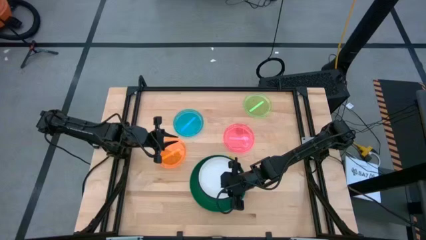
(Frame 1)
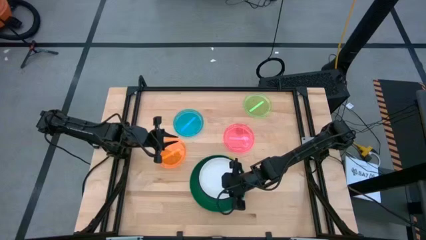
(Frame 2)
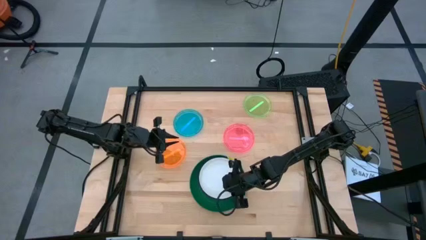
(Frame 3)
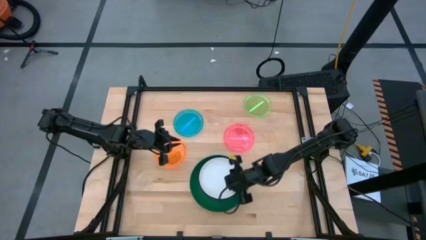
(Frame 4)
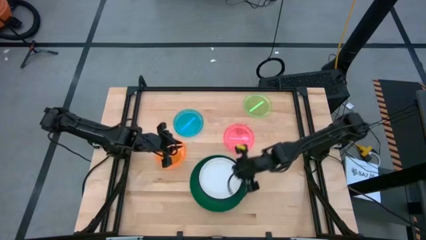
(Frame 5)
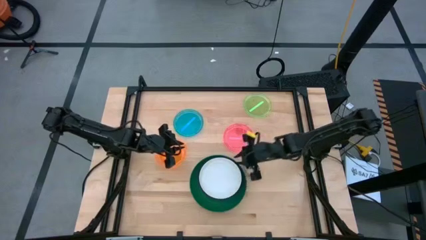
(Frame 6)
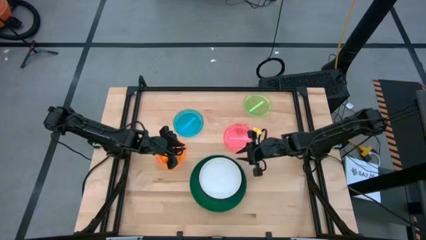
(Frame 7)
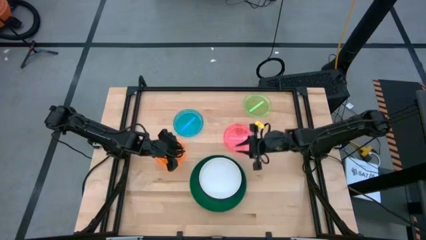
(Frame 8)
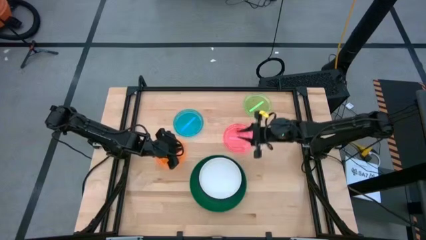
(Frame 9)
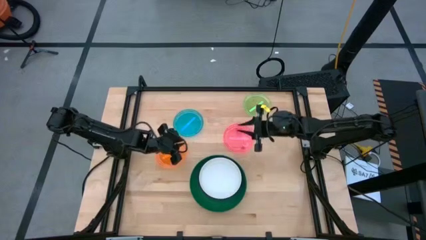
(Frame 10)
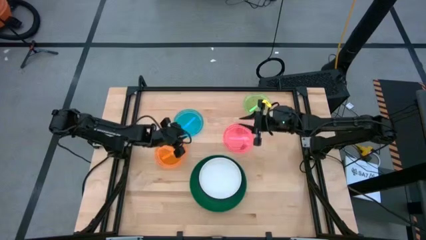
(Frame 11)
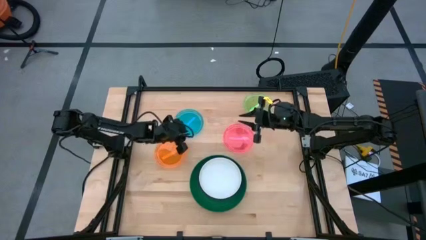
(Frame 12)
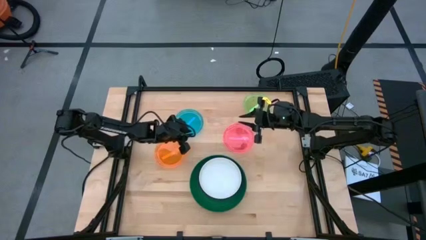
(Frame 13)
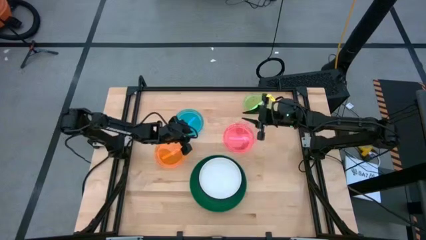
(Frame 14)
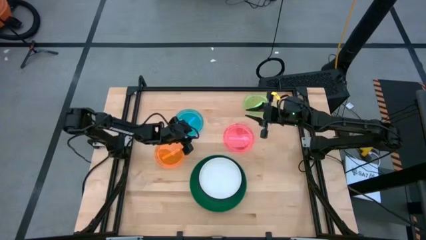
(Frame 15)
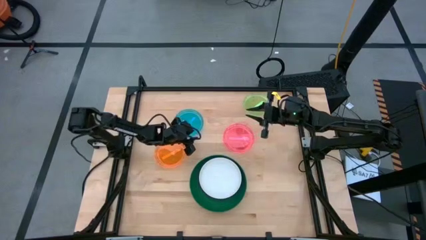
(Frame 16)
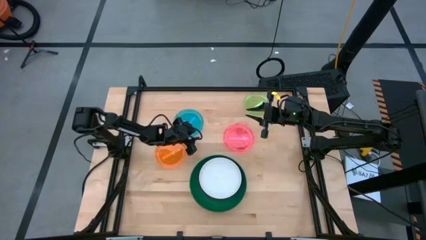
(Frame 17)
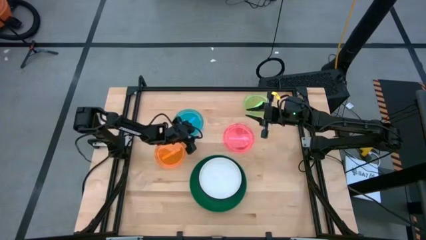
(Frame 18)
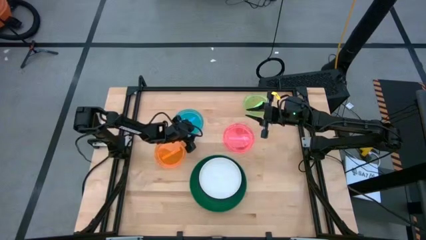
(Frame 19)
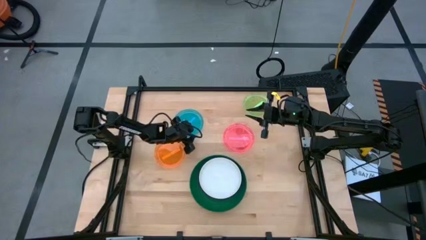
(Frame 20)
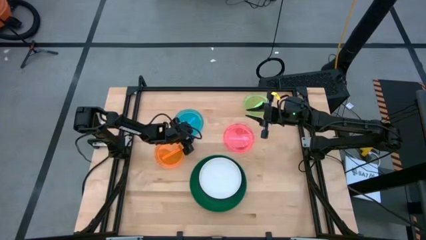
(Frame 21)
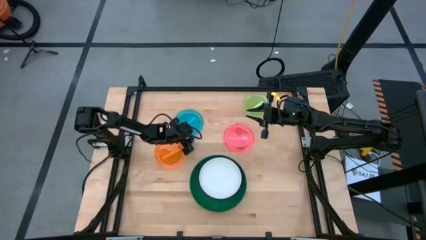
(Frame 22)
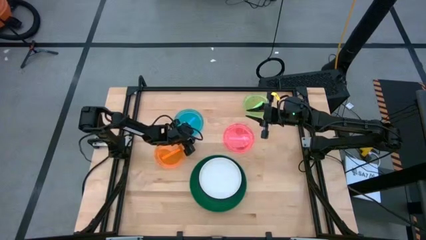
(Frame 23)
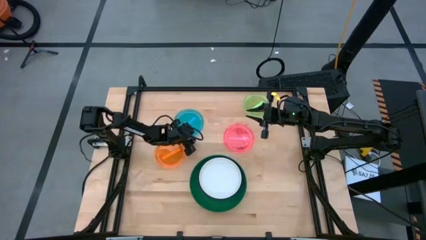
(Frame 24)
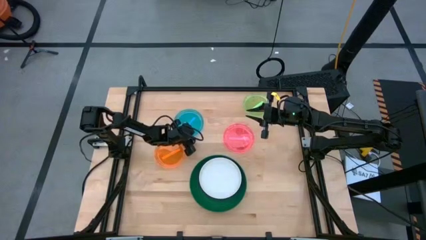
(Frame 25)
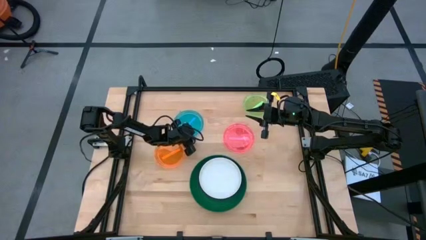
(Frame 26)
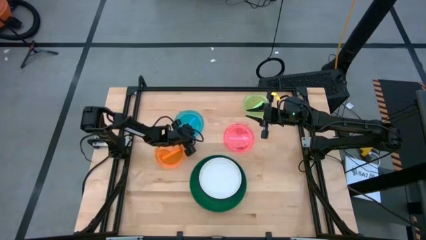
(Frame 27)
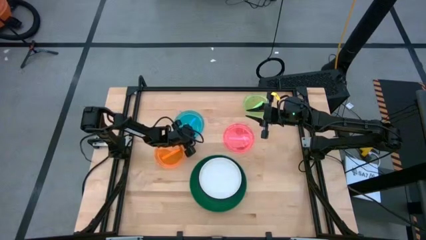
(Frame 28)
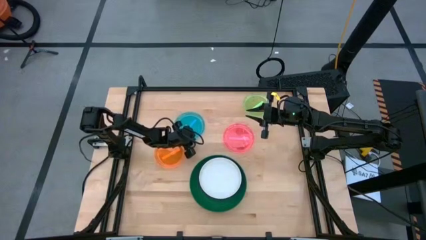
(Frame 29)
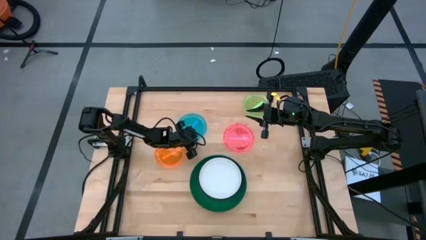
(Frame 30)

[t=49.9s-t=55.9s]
Task: Stack plastic plates
Stack the light blue plate on top of the white plate

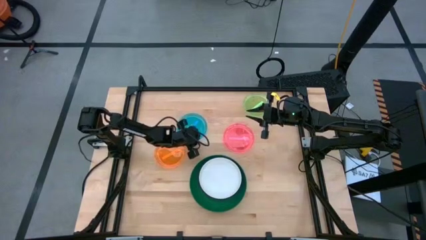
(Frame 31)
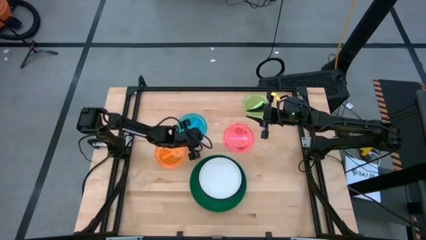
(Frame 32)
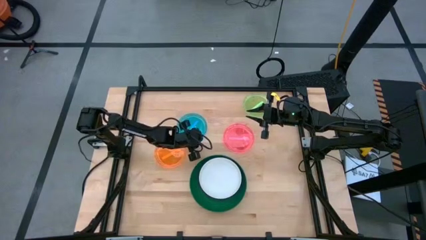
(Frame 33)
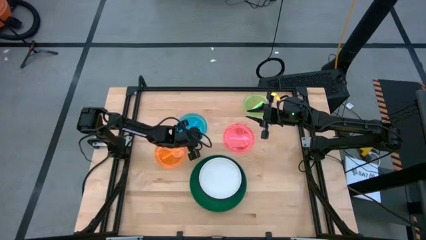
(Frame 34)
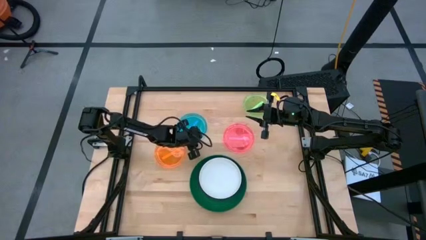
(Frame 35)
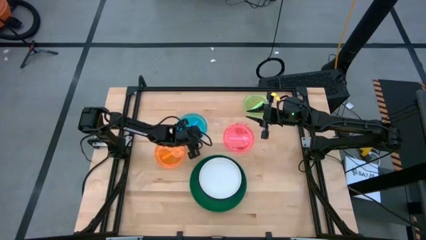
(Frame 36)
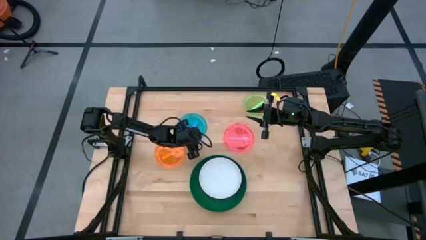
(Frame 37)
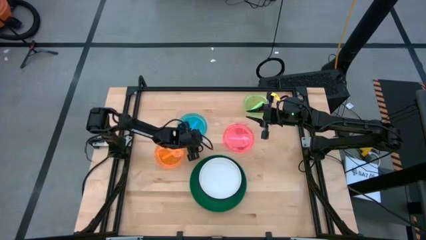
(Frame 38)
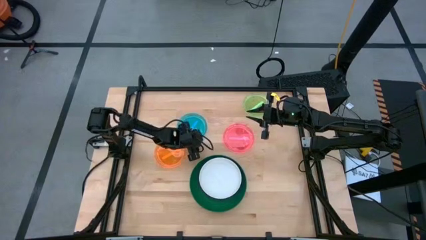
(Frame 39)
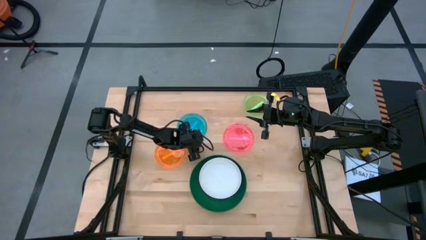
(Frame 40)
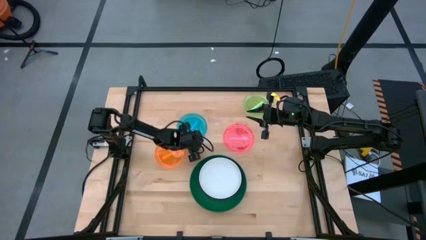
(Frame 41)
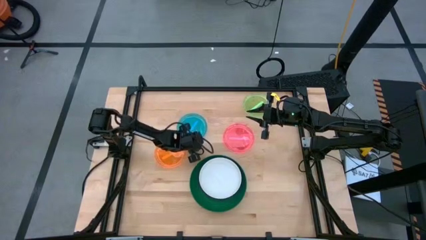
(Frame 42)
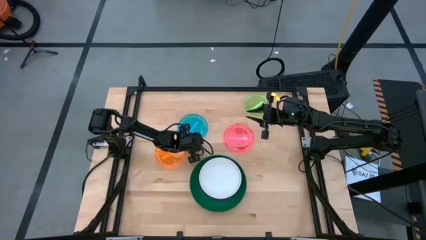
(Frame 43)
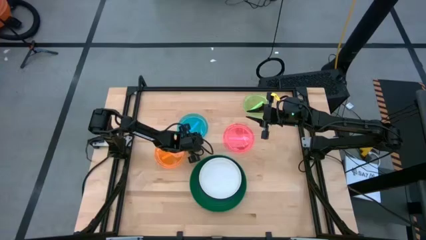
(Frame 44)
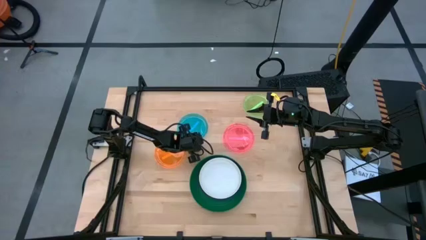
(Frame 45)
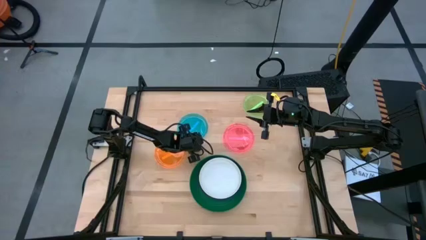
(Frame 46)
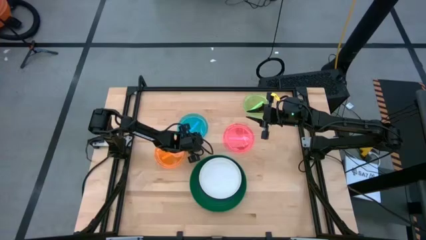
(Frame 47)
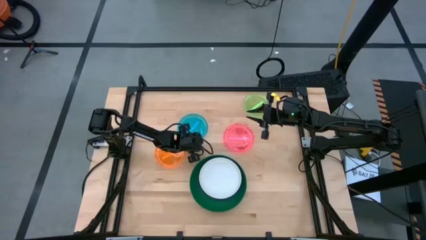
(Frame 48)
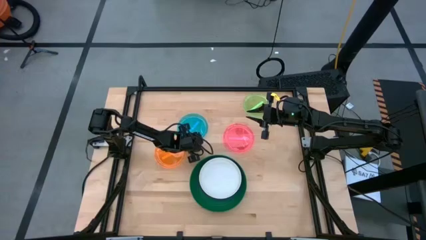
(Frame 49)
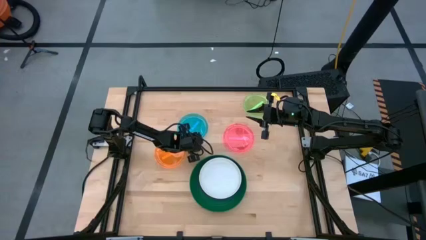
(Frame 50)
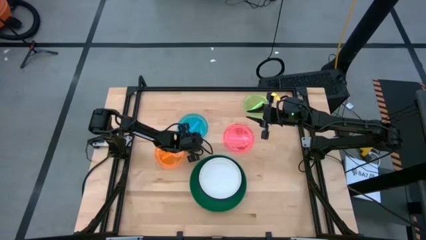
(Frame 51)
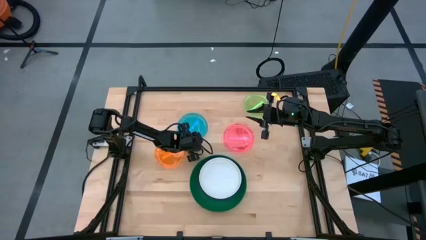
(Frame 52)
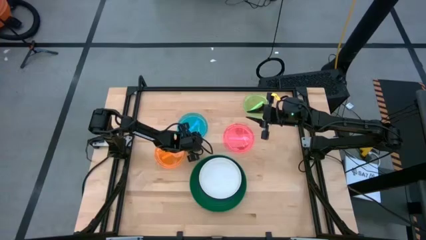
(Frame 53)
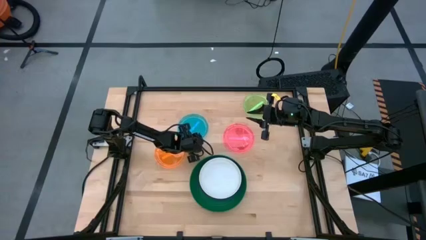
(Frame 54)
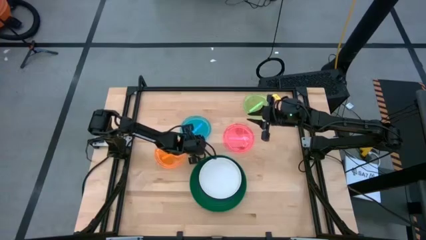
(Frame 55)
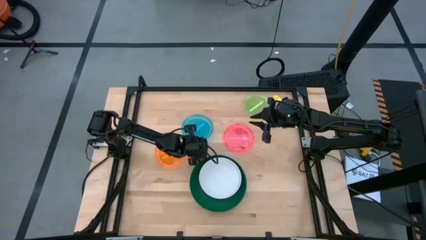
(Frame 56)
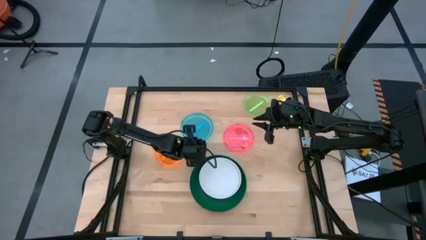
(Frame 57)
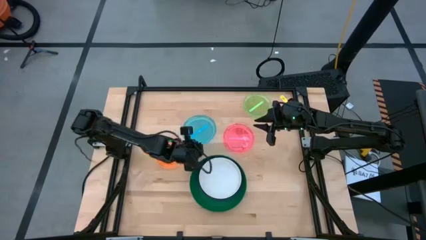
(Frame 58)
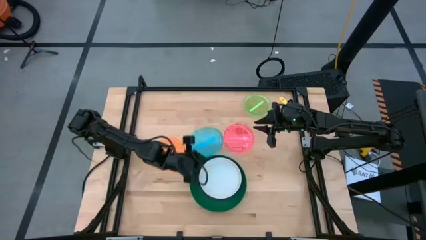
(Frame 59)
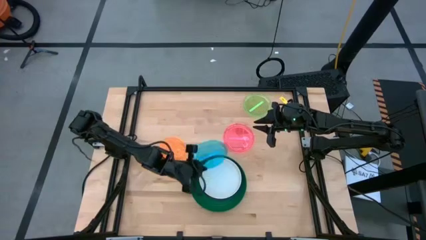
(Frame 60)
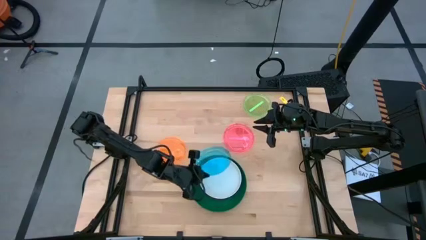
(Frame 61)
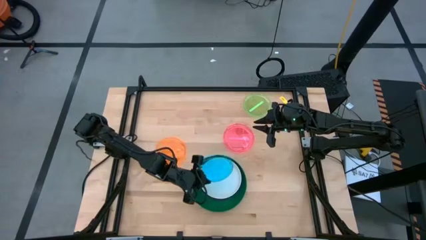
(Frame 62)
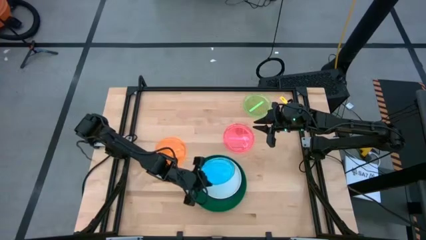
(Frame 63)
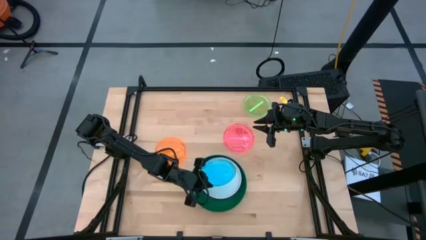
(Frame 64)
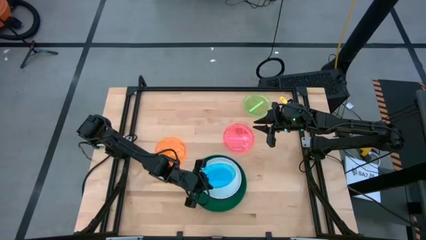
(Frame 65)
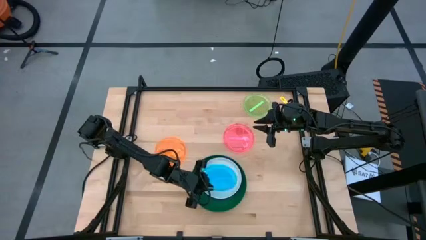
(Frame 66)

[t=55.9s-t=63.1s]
Stack the light blue plate on top of the white plate

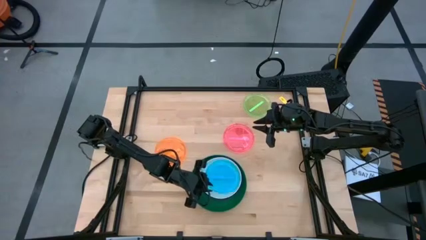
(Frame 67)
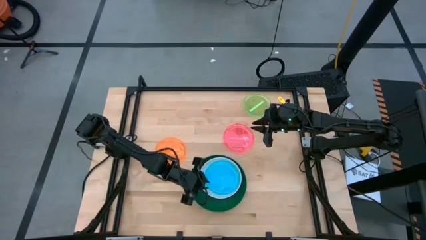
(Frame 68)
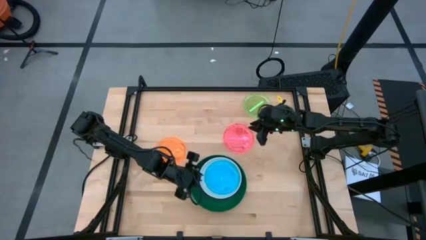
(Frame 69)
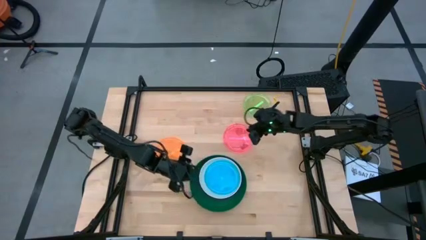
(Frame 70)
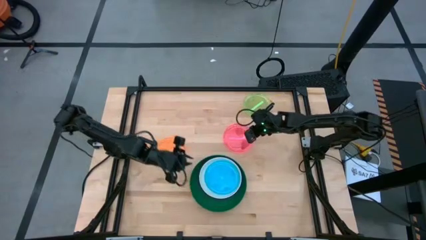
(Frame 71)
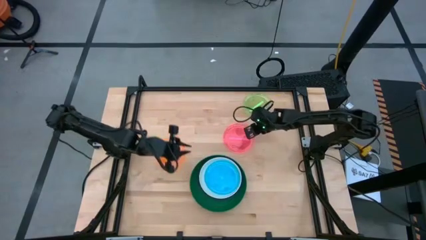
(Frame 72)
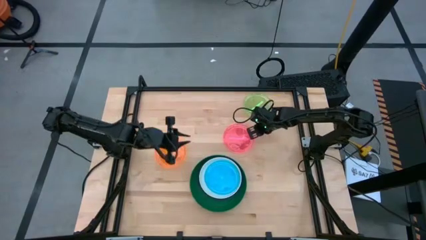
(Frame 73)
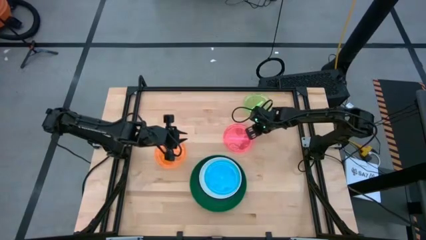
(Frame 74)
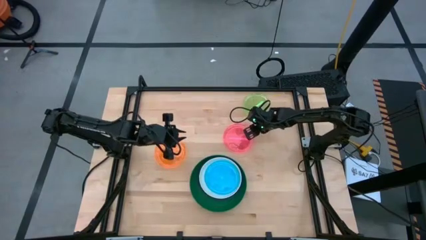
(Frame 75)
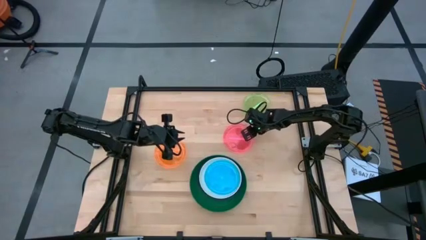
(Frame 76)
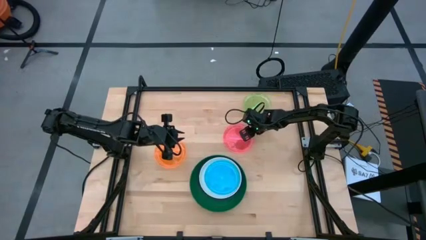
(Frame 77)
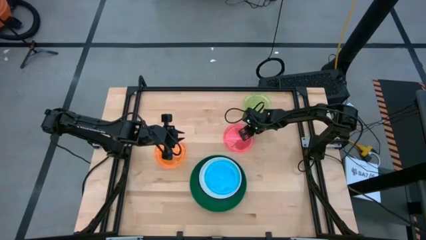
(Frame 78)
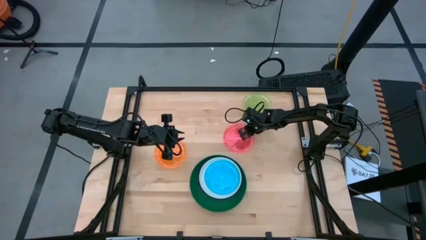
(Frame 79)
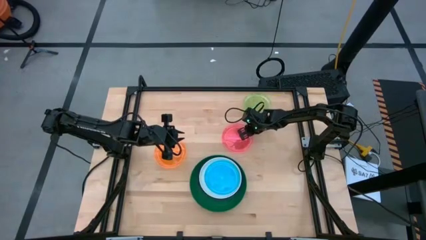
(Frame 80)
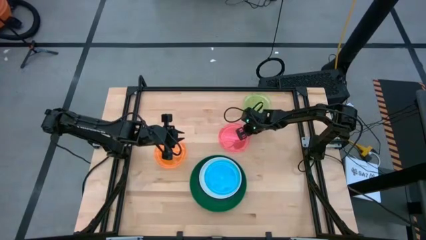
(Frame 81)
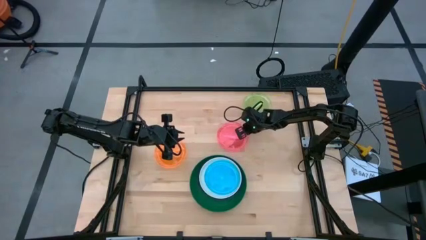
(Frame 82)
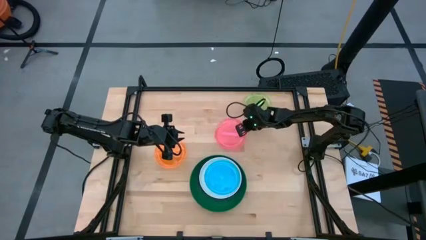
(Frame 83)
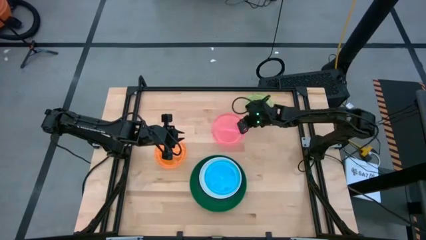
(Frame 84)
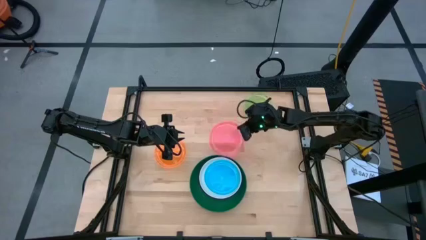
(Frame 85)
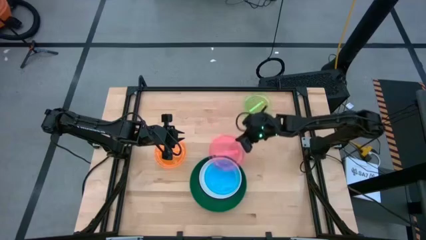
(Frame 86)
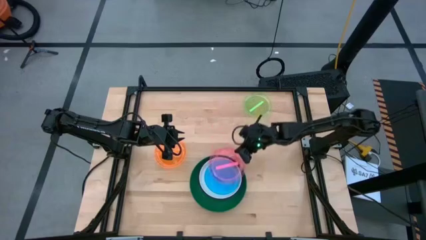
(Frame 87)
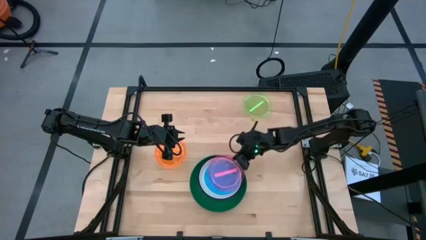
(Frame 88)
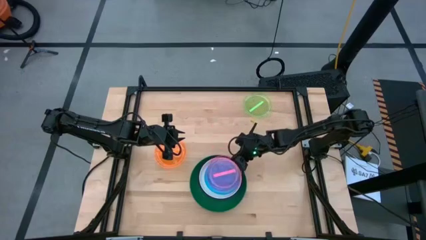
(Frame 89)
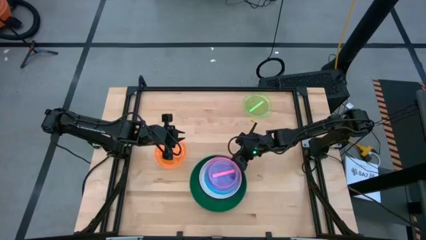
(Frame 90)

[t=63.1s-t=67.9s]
Stack the pink plate on top of the light blue plate
